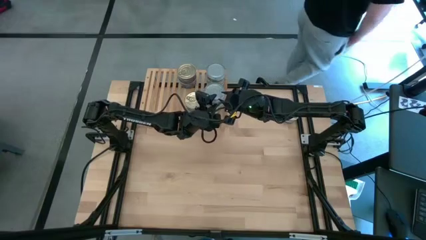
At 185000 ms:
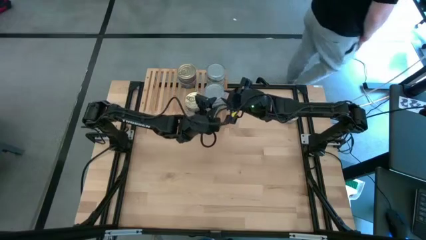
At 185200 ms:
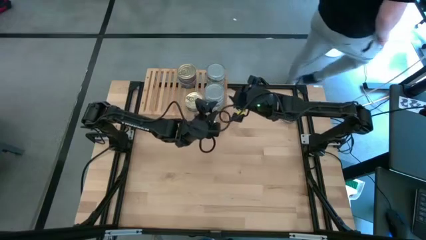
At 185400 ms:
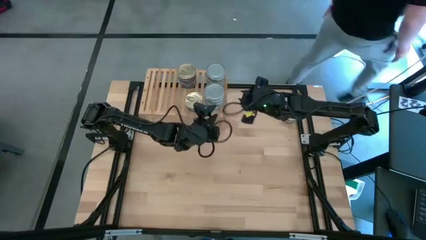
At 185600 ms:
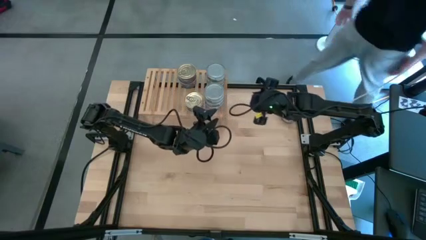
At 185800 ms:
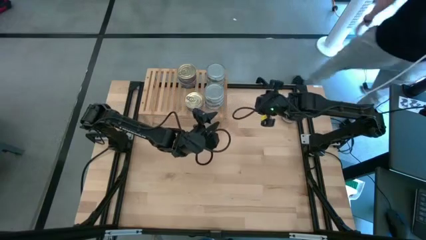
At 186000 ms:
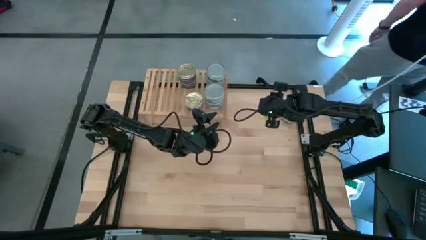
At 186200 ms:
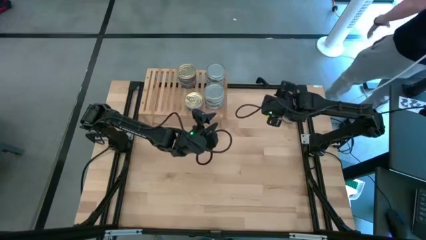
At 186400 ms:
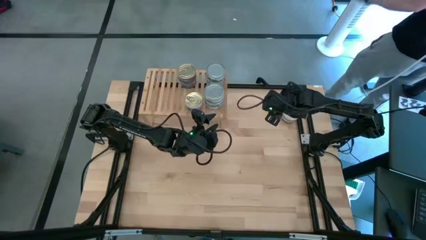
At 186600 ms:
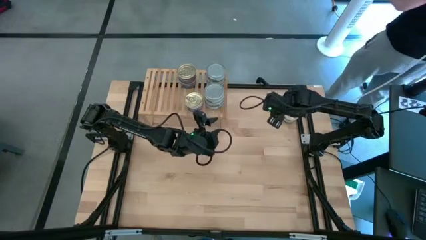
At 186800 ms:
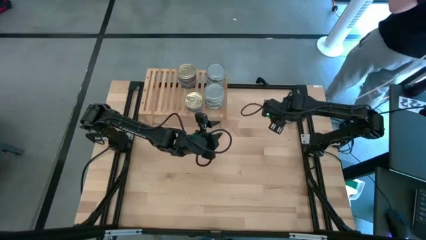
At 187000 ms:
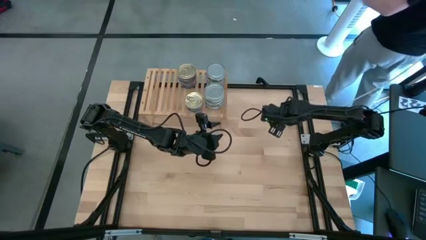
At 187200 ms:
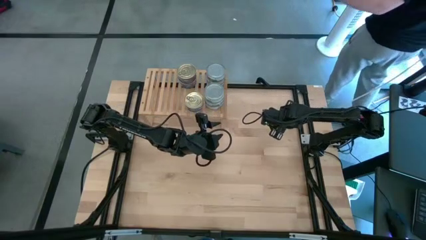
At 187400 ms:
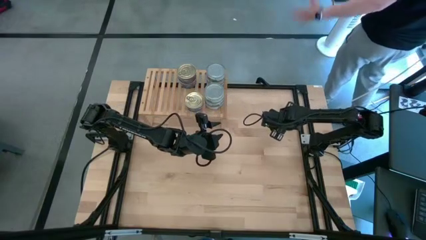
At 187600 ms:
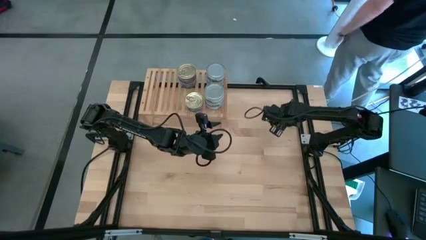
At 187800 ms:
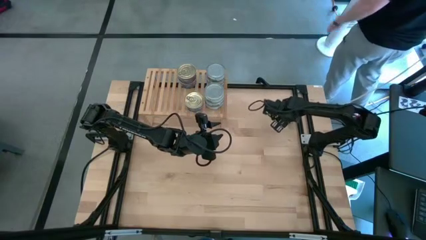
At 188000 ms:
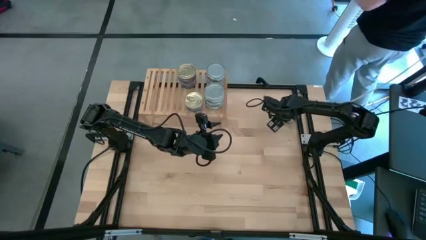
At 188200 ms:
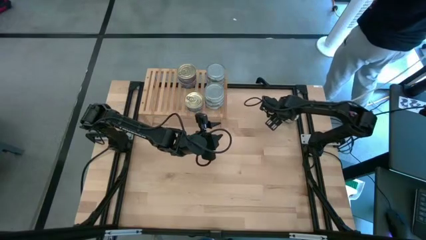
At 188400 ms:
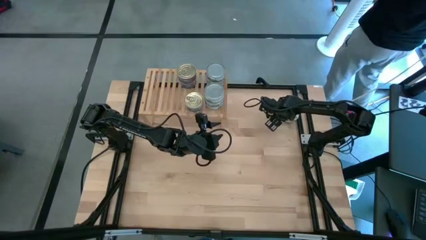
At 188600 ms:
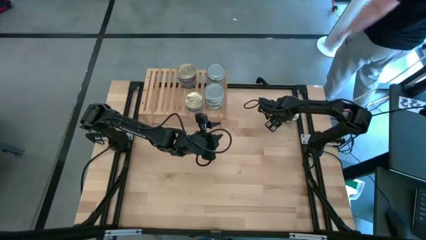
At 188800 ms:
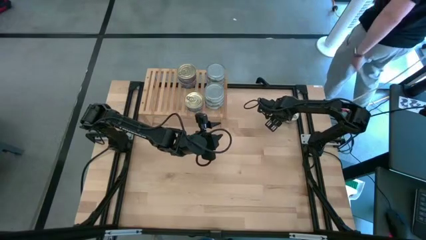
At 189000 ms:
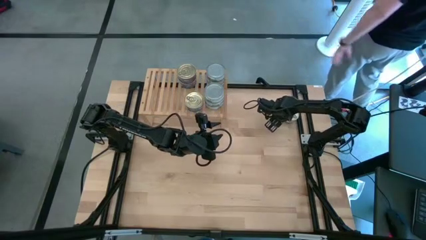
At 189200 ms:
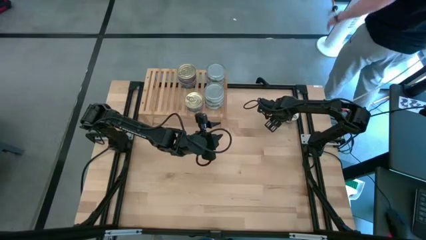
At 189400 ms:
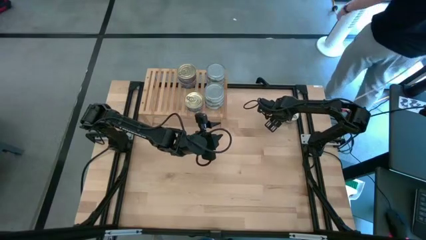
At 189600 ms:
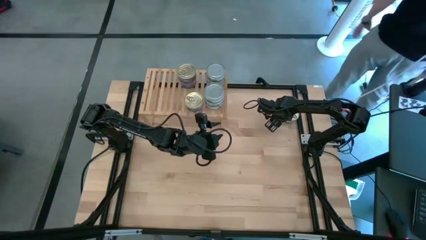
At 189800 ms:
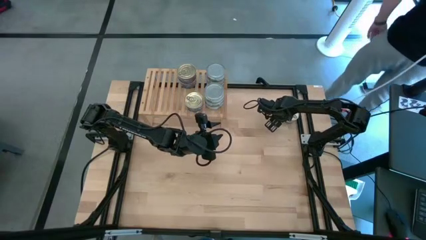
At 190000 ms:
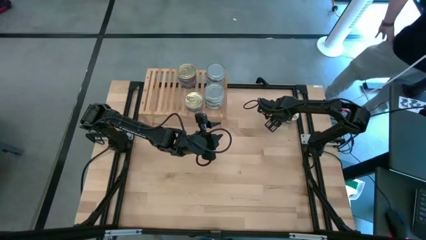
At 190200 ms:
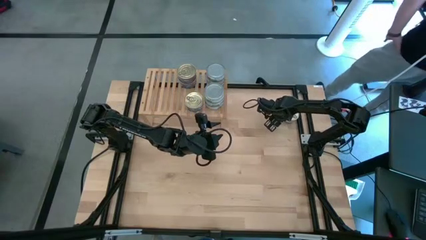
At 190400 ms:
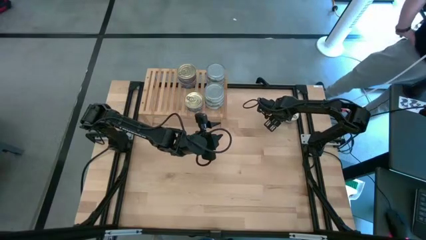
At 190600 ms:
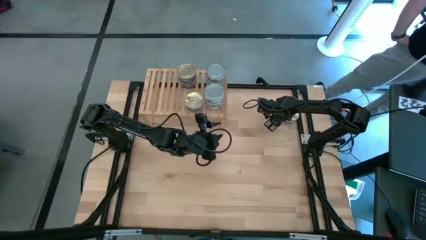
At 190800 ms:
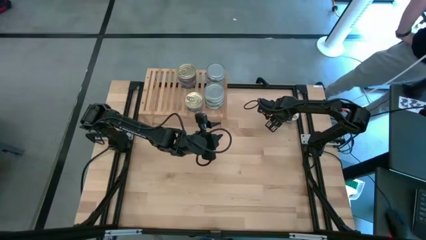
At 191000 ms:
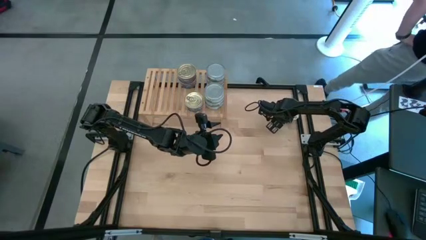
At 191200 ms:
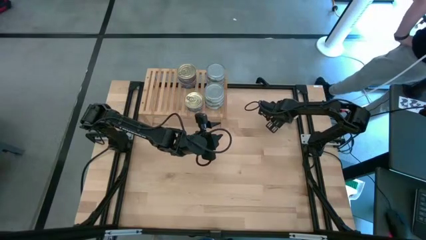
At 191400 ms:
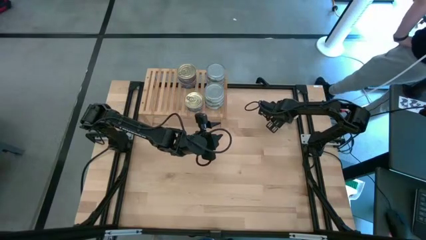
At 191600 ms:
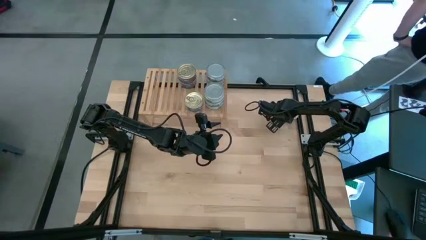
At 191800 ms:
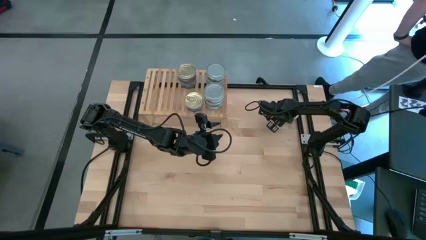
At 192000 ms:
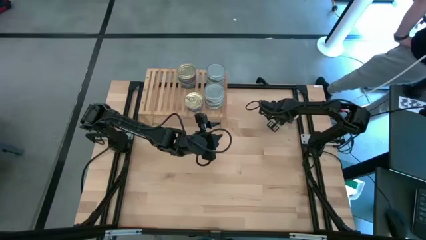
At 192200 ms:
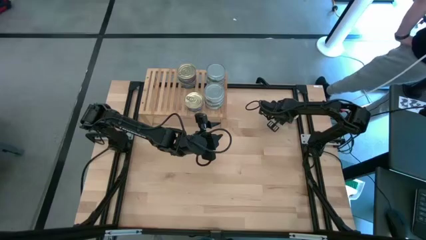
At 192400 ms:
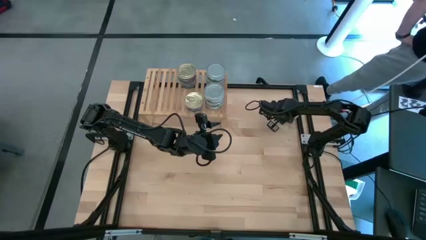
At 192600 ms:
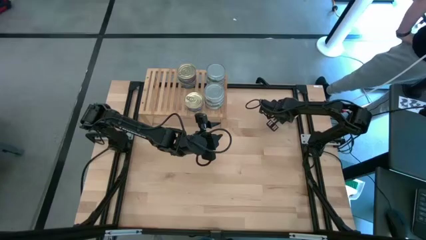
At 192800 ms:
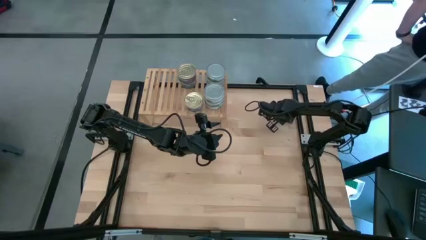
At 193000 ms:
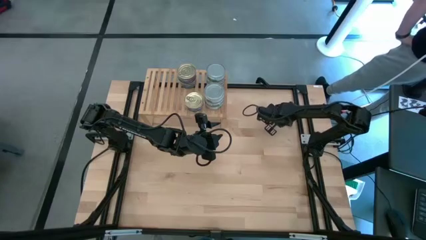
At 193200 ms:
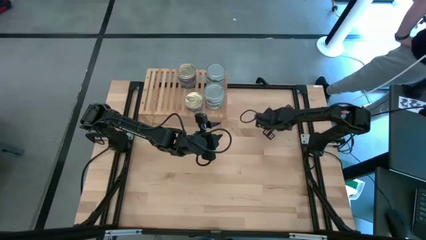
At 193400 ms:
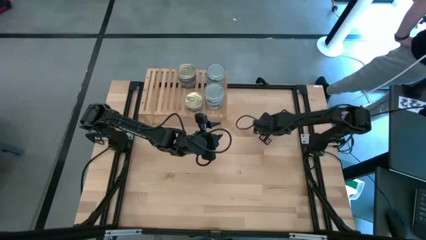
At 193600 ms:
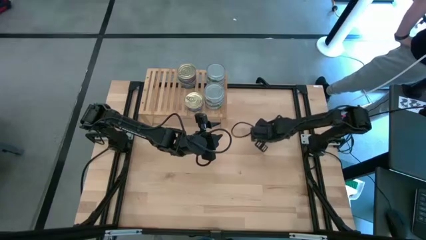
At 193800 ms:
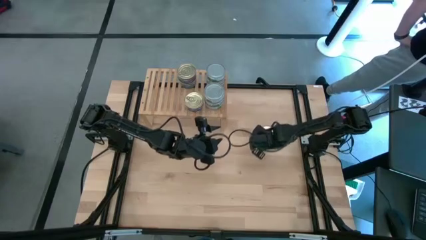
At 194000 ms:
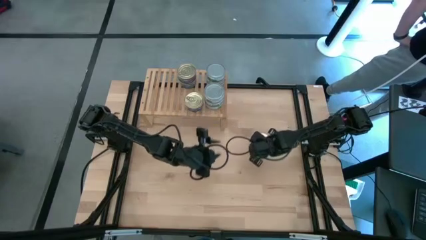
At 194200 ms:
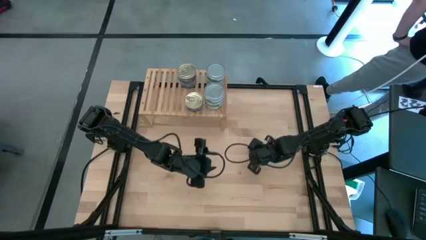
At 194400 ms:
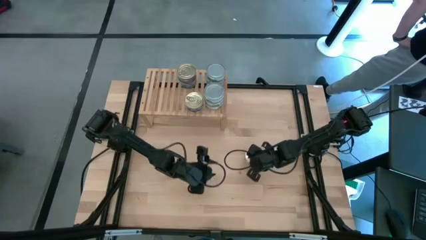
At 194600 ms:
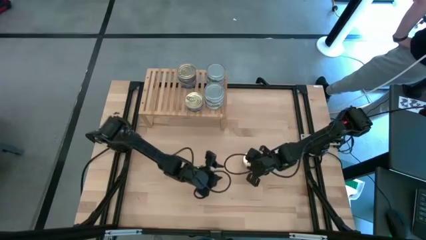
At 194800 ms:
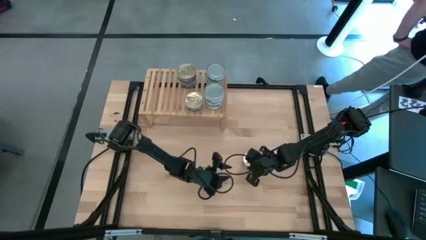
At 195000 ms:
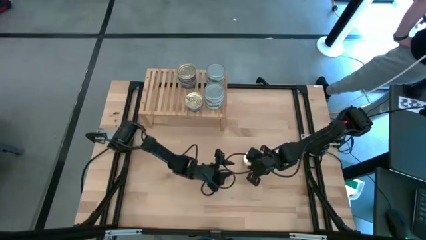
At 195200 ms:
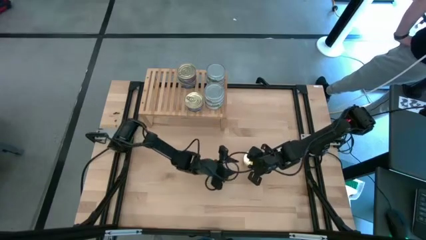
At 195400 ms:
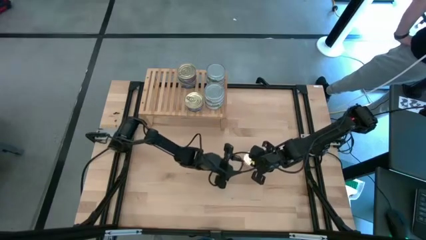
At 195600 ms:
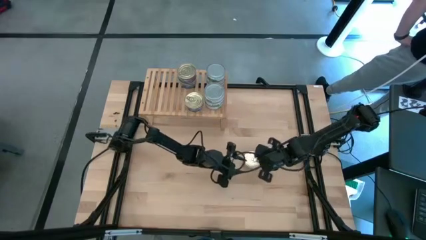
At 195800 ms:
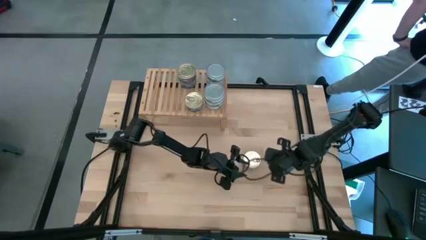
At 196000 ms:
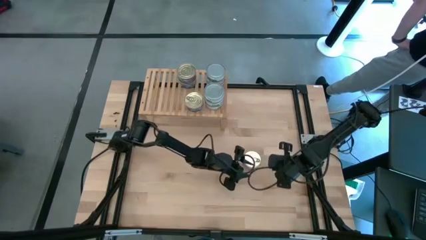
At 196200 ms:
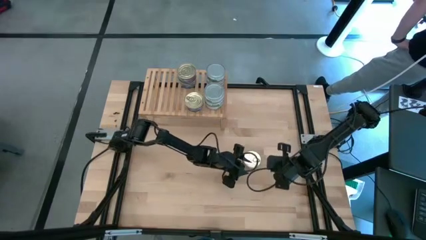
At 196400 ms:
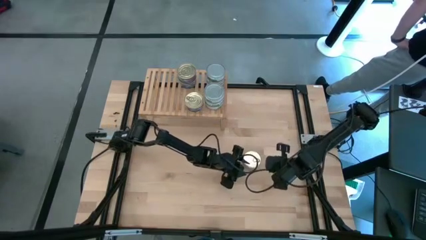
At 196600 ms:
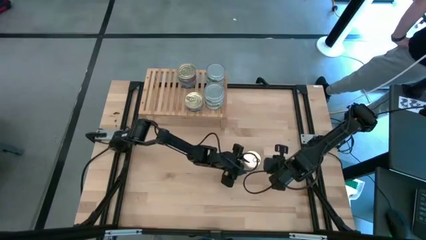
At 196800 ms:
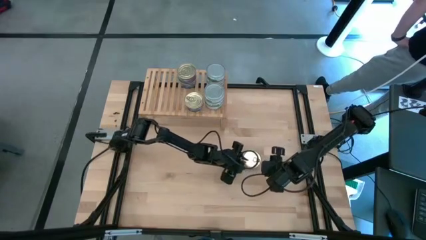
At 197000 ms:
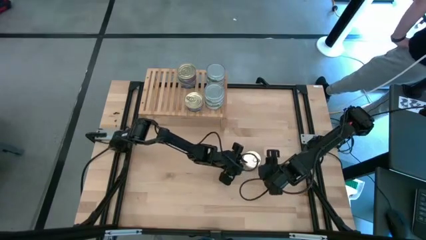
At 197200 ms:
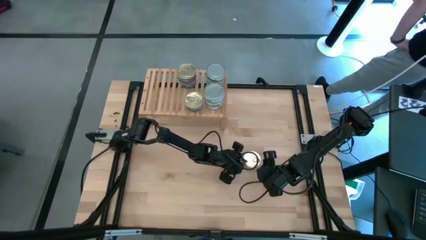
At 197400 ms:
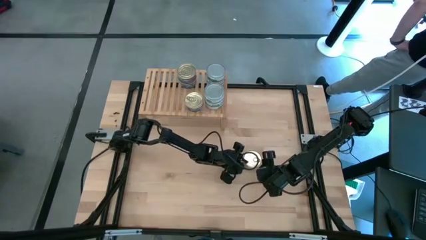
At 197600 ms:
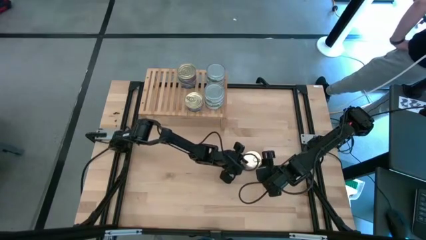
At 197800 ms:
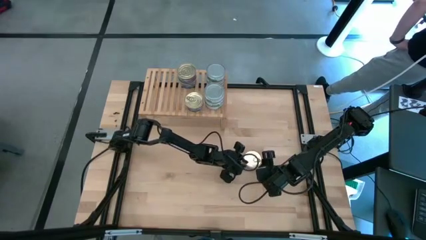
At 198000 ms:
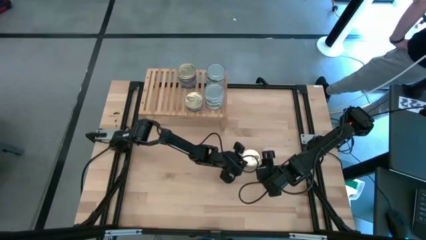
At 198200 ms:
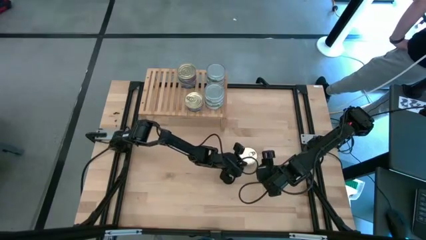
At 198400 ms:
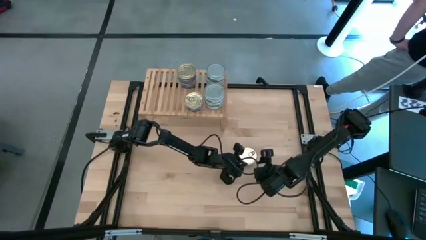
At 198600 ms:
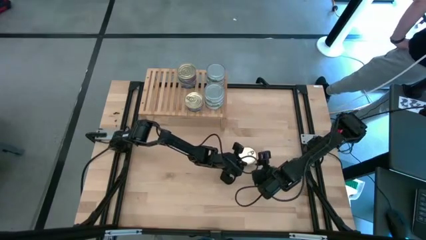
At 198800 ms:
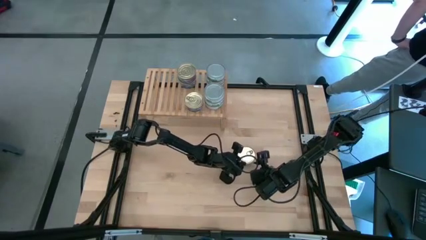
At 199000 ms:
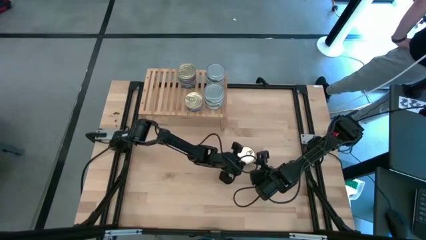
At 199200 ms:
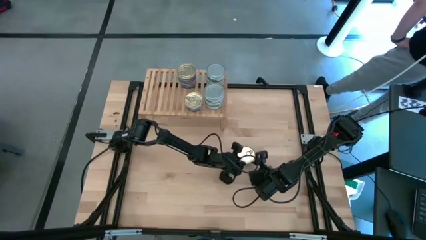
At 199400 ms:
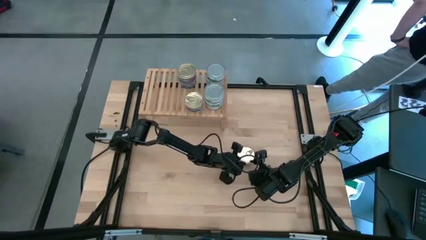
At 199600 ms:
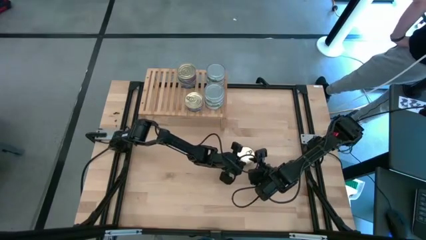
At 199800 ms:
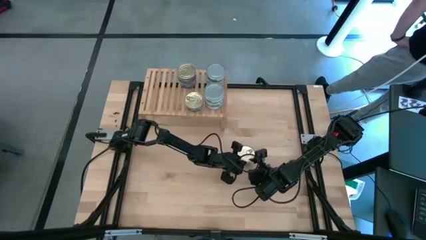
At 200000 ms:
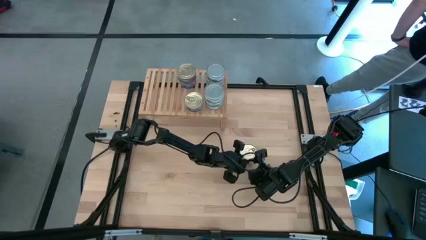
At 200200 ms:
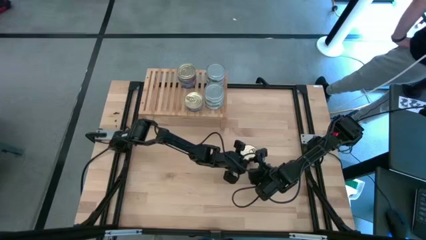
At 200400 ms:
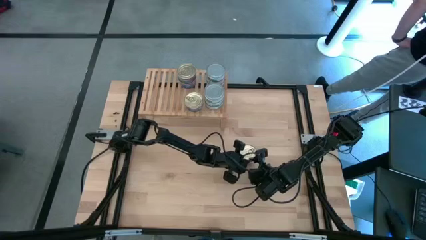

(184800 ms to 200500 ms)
Task: Stack canned seafood by type on shelf
Stack the blue tuna can on top of the bottom blue tuna can on the shelf

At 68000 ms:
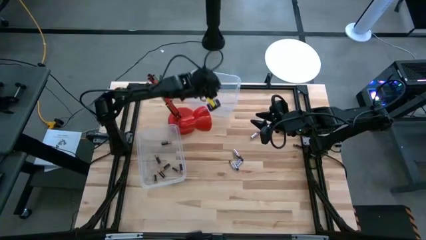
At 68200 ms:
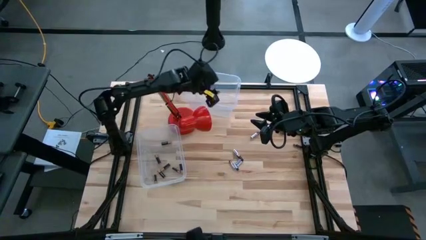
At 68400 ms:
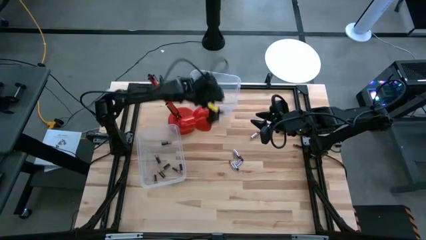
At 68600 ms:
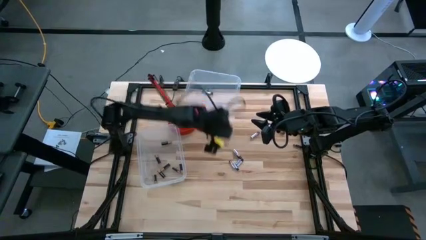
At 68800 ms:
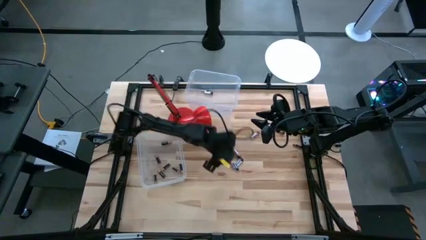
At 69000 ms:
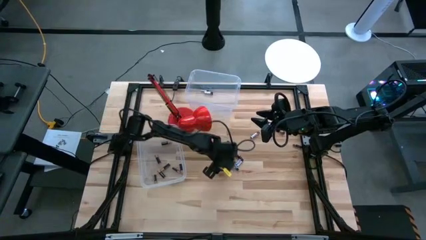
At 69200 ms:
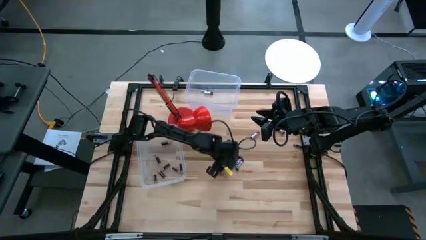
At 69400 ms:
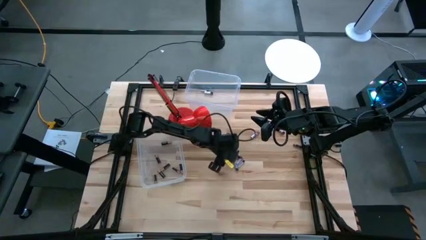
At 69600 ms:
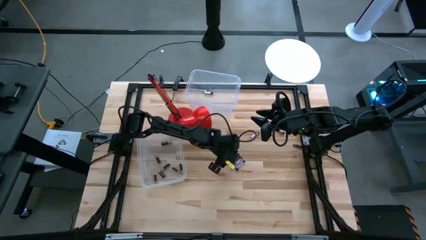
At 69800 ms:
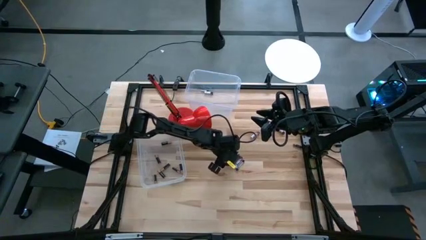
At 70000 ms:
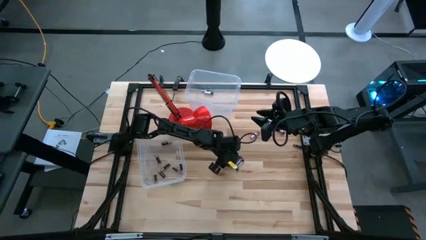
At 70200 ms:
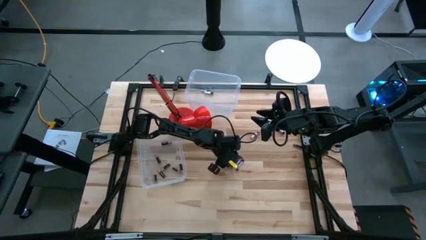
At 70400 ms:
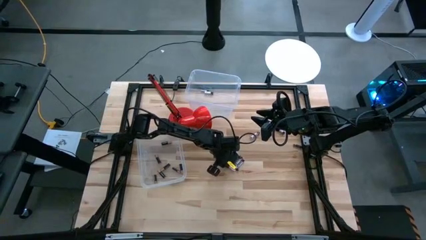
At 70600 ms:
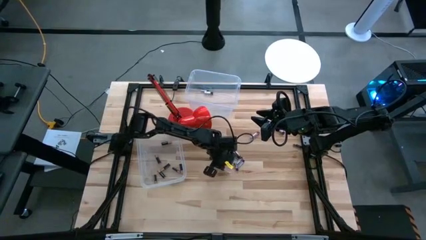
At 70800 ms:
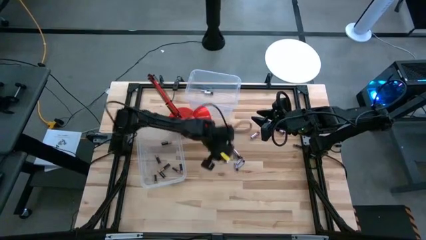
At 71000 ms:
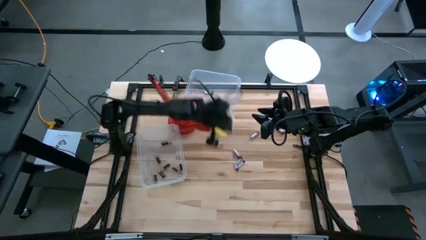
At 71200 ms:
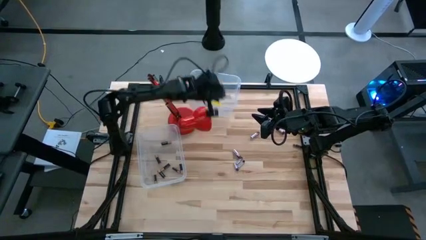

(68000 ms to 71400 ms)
Task: Sort batteries
Put the white battery into the top transparent bin
